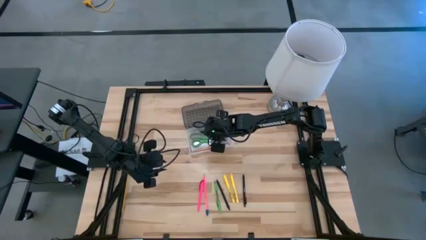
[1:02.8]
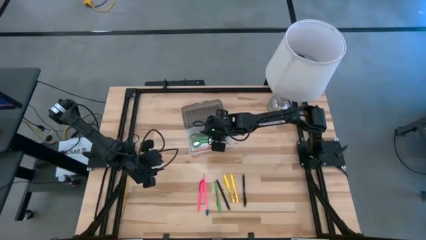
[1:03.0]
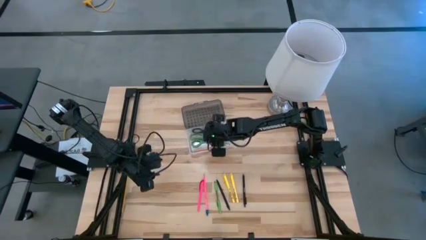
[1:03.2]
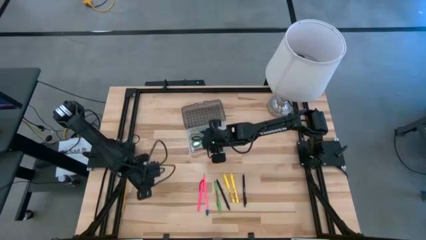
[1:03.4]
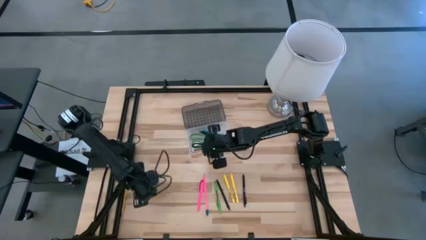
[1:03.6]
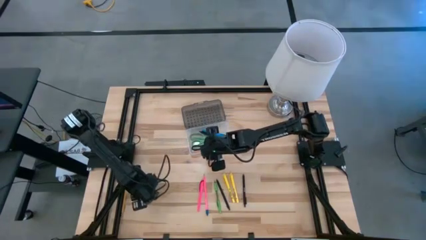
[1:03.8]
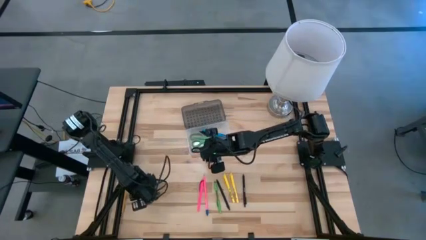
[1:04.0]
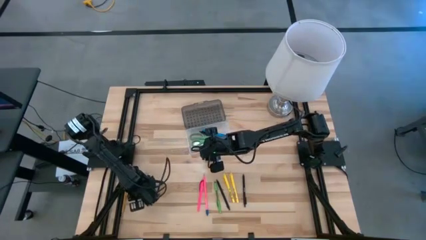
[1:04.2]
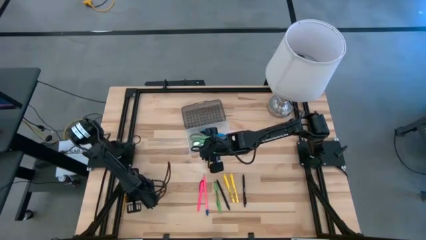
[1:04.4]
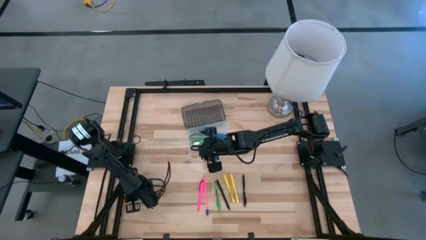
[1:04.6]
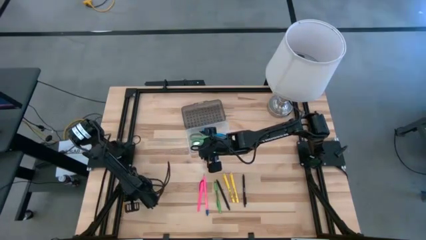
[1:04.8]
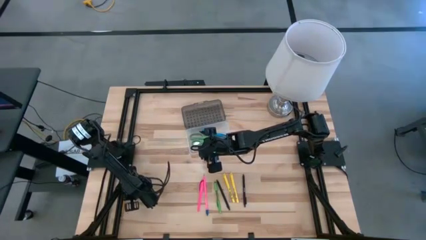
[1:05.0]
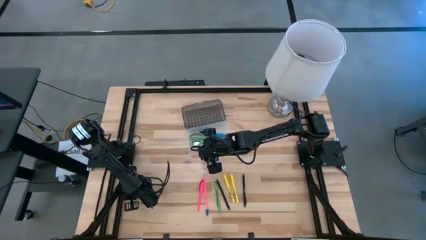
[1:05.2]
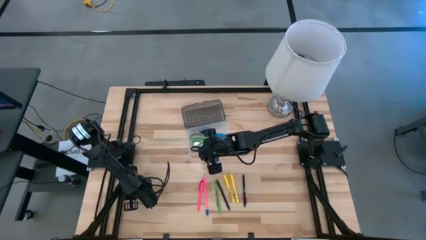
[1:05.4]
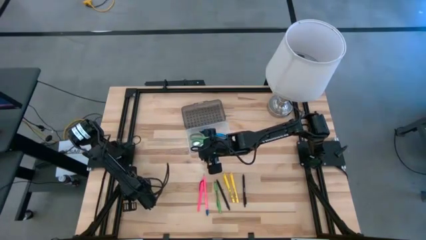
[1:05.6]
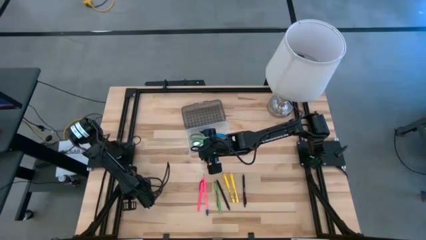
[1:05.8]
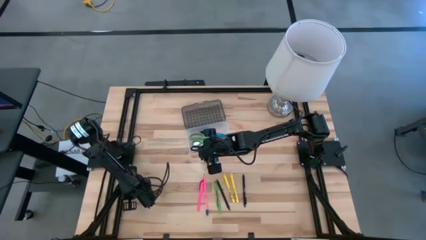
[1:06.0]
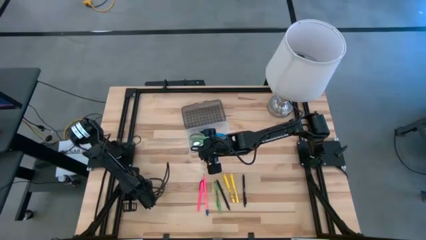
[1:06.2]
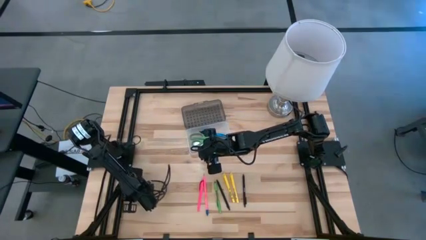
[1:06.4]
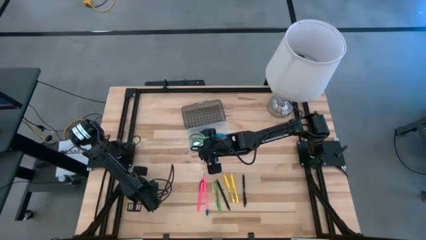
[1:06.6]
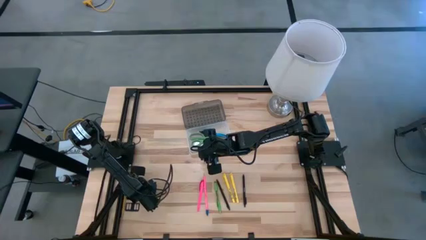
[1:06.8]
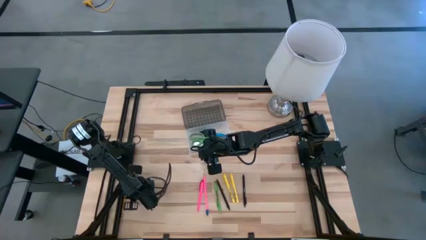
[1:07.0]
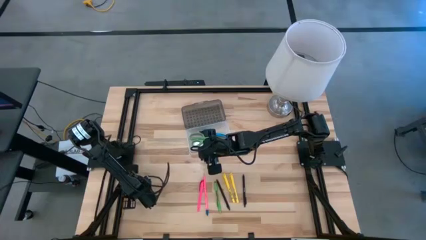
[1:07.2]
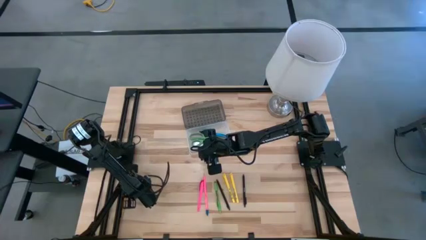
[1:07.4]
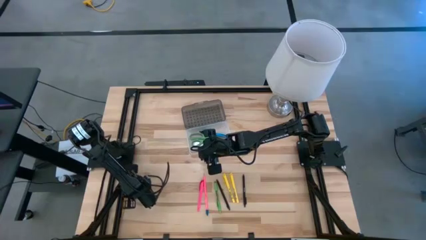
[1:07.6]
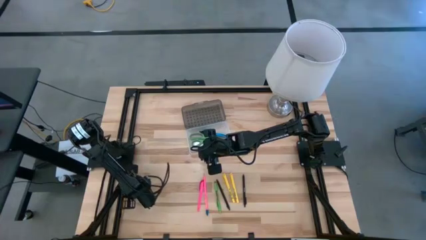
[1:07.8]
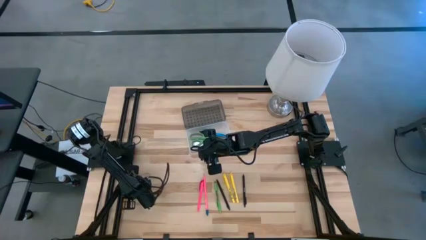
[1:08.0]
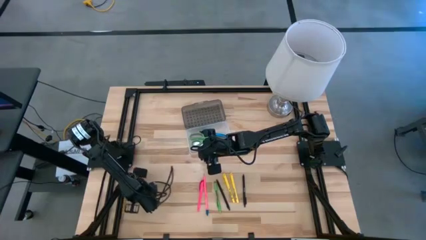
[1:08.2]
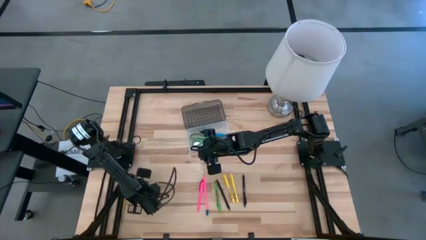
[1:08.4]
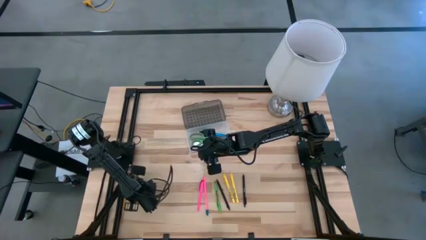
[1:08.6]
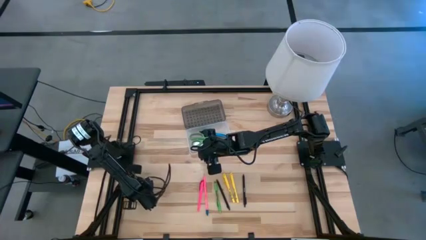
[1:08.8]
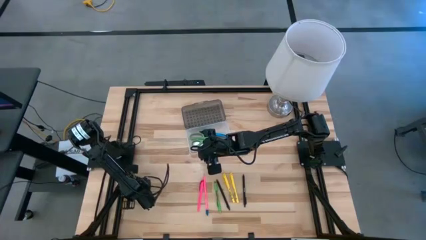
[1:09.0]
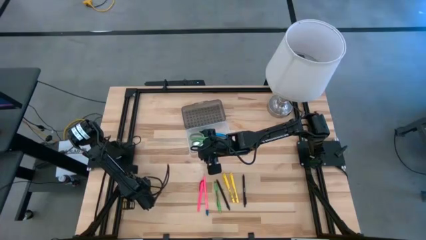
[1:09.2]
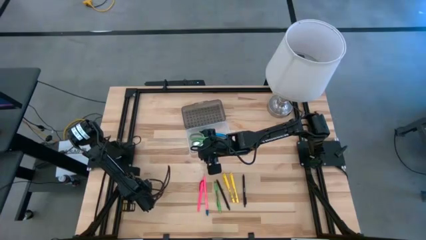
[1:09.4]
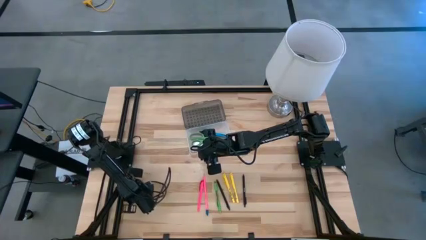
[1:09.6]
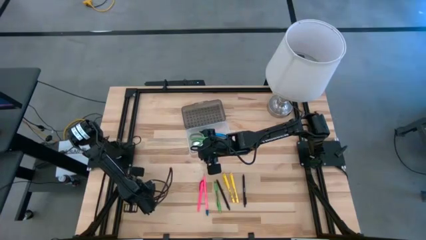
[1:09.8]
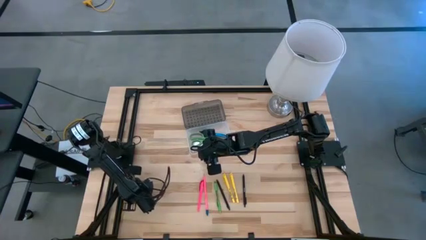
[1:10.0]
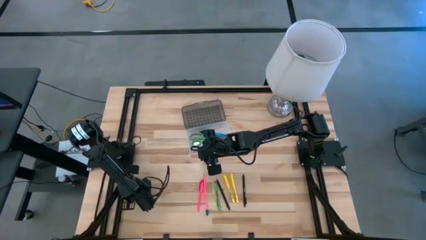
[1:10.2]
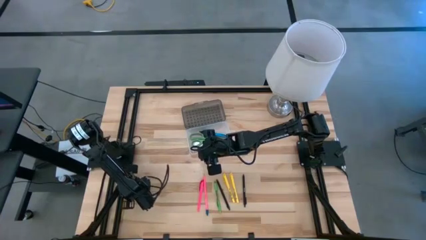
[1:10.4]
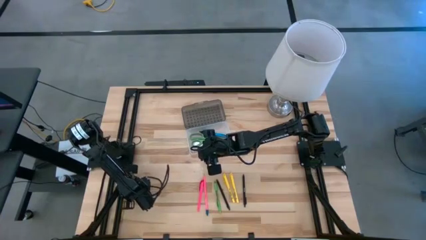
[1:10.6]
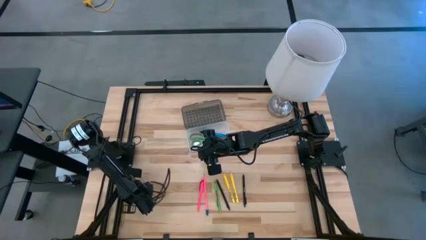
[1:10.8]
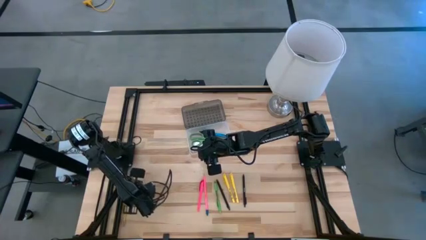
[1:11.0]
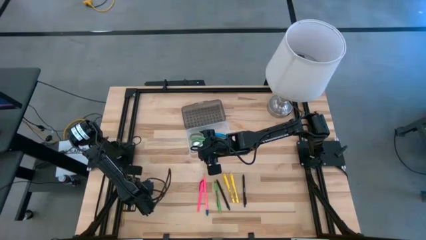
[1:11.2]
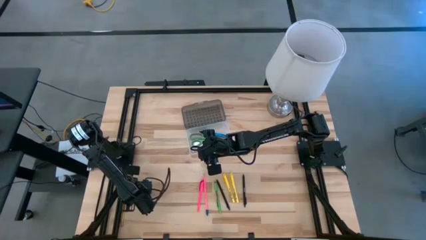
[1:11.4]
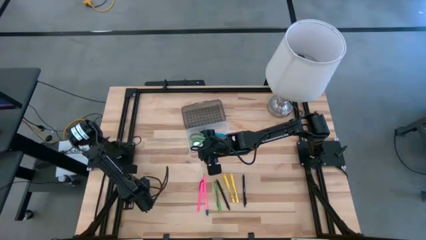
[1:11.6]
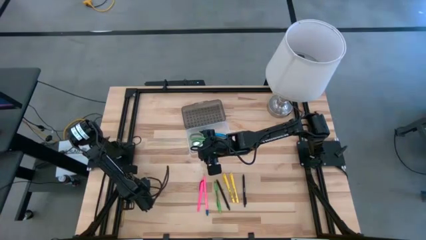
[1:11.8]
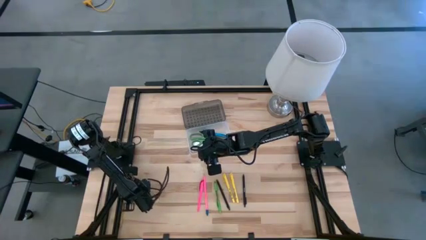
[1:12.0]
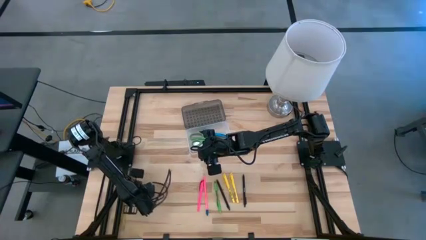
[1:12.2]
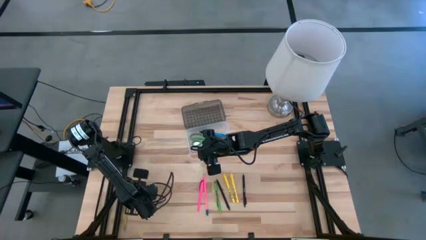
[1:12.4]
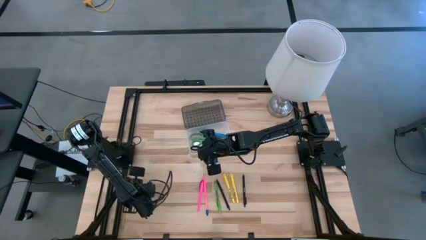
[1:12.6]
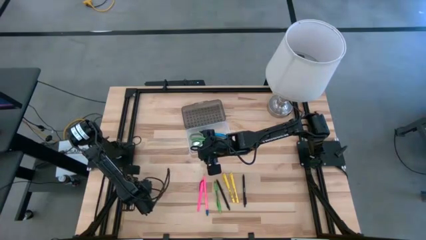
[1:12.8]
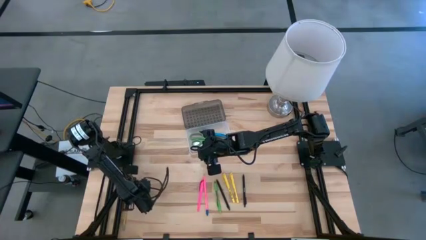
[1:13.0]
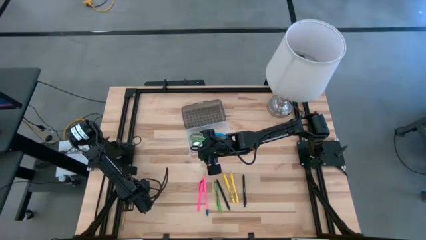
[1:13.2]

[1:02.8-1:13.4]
Task: Pick & place school supplies into a supply box
Put the yellow pencil into the transparent supply box
